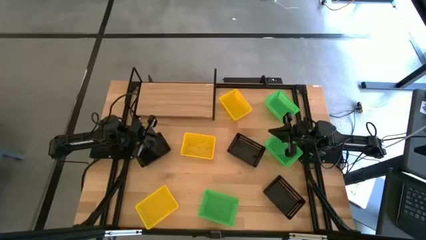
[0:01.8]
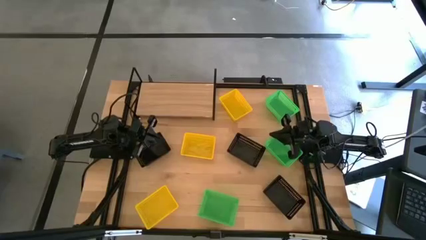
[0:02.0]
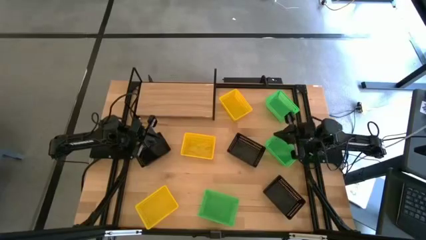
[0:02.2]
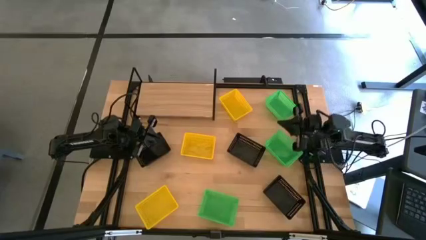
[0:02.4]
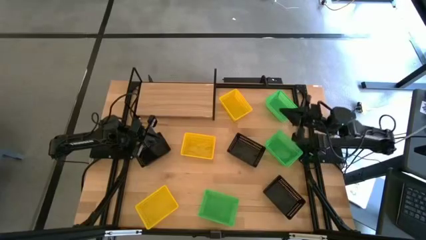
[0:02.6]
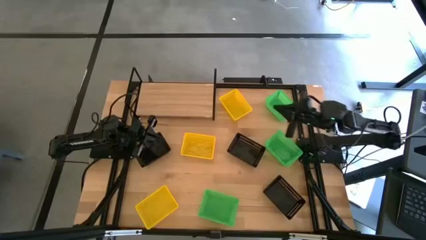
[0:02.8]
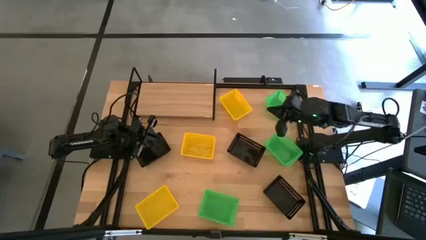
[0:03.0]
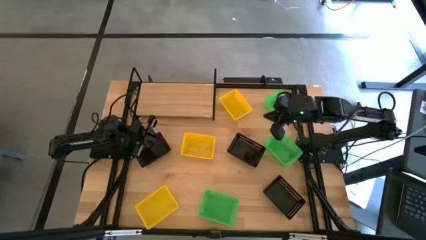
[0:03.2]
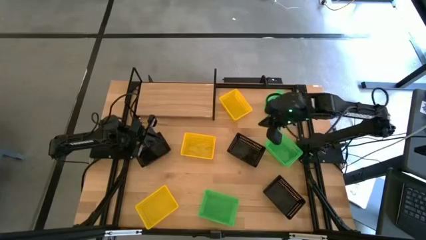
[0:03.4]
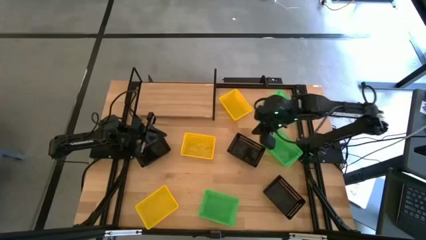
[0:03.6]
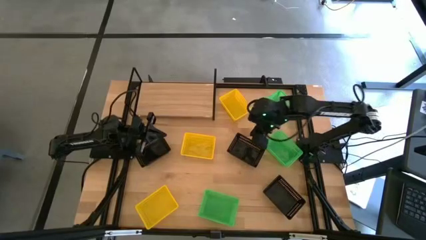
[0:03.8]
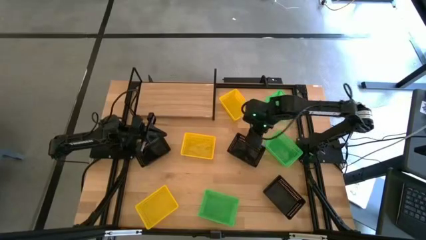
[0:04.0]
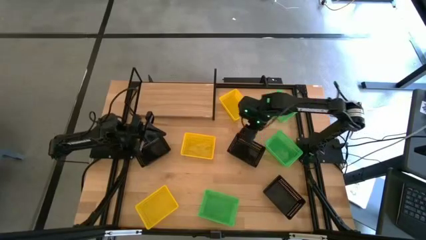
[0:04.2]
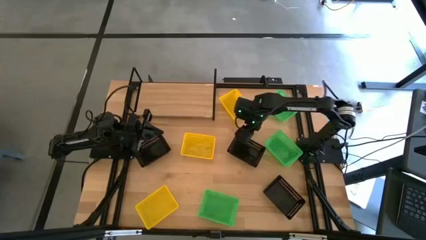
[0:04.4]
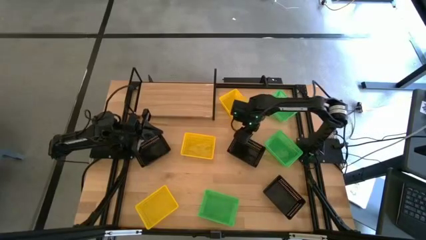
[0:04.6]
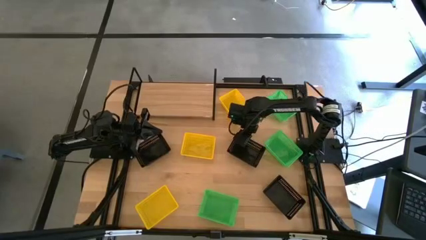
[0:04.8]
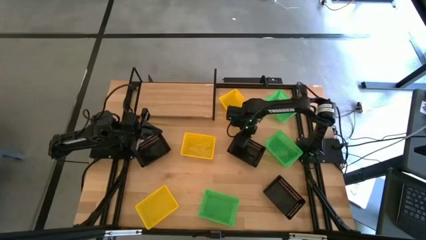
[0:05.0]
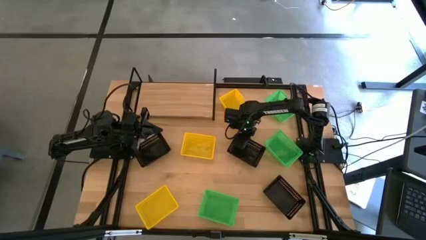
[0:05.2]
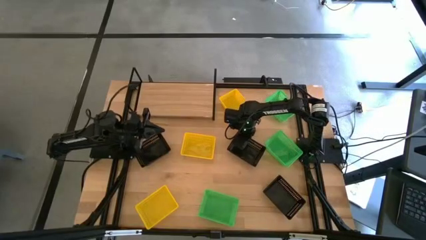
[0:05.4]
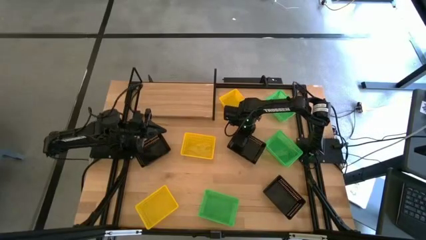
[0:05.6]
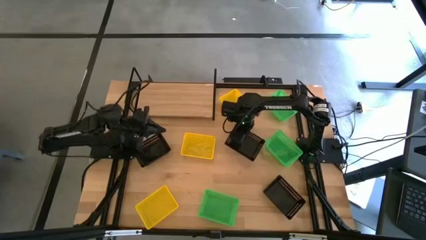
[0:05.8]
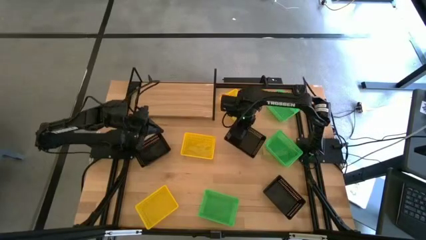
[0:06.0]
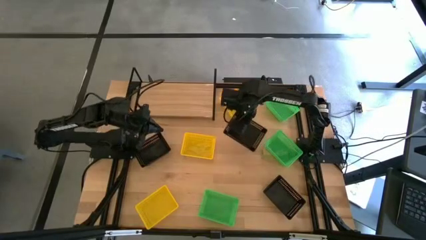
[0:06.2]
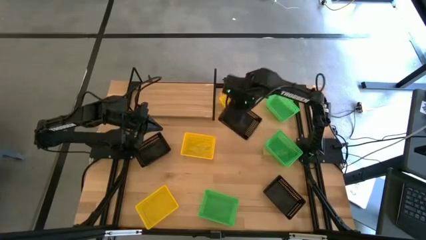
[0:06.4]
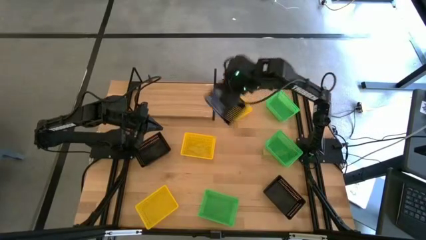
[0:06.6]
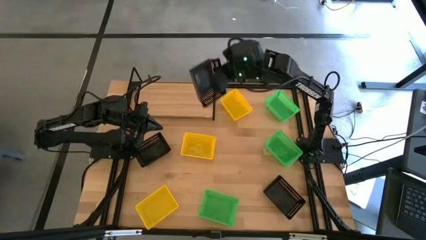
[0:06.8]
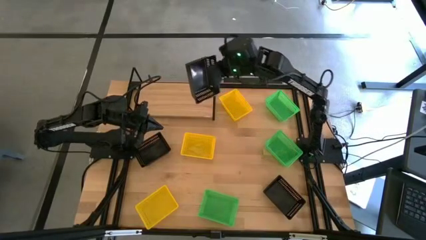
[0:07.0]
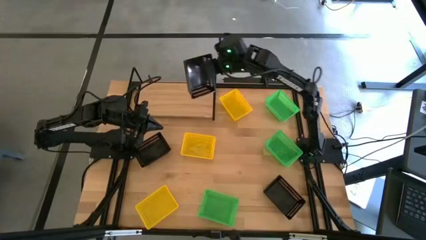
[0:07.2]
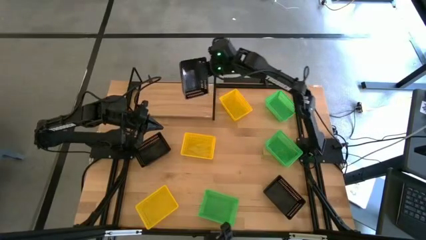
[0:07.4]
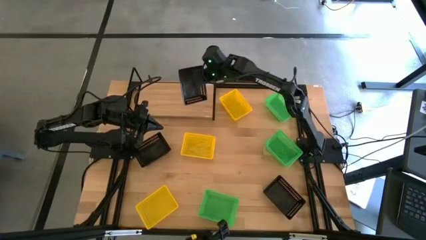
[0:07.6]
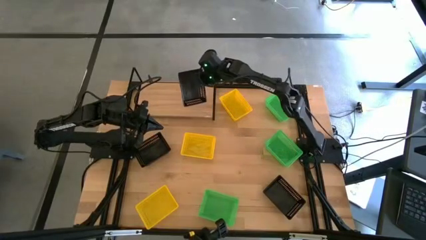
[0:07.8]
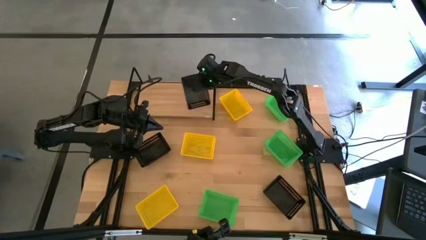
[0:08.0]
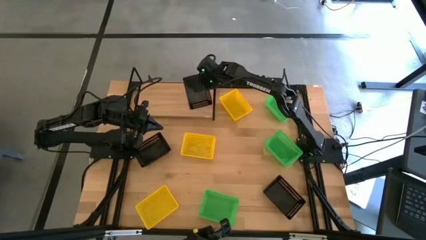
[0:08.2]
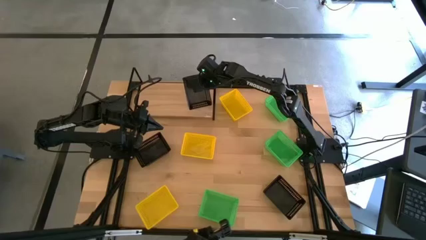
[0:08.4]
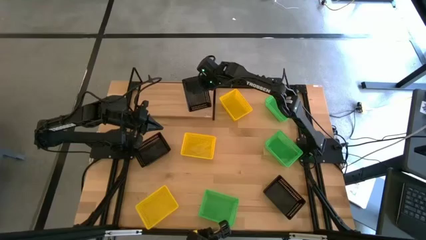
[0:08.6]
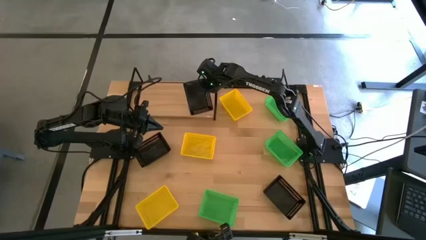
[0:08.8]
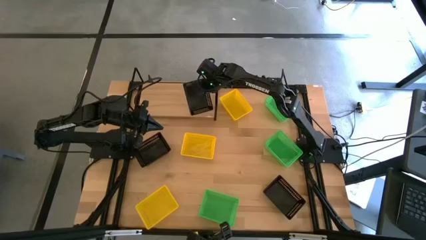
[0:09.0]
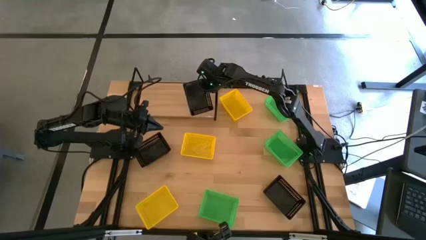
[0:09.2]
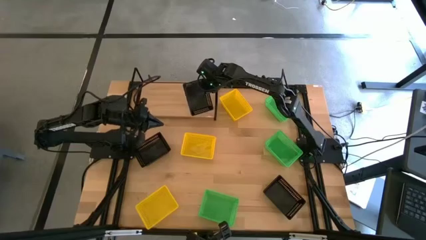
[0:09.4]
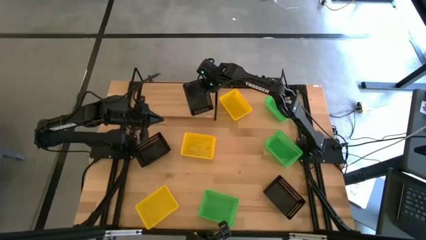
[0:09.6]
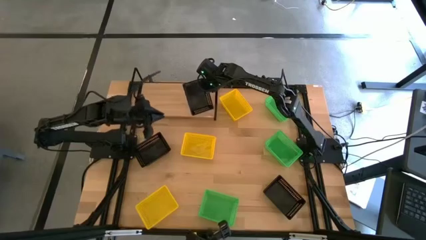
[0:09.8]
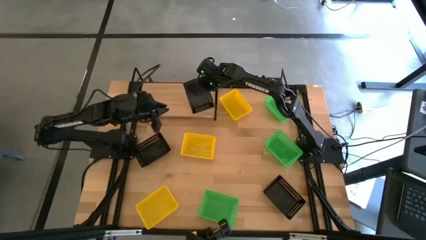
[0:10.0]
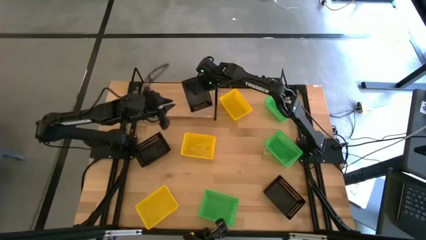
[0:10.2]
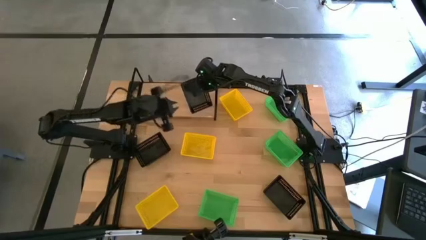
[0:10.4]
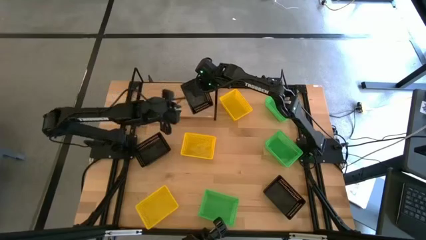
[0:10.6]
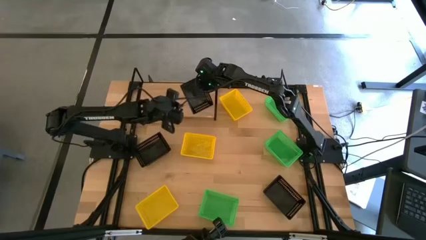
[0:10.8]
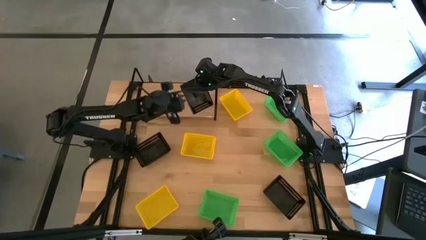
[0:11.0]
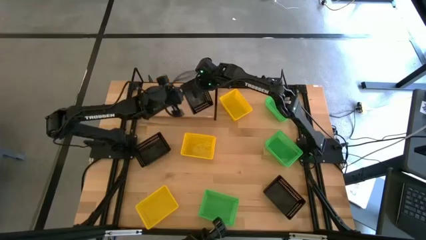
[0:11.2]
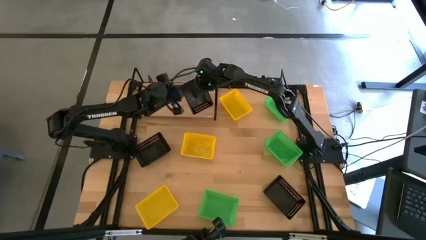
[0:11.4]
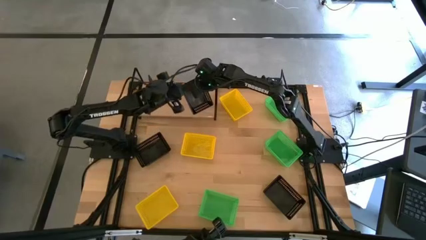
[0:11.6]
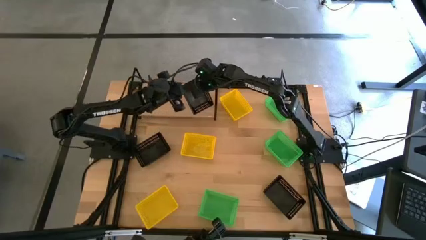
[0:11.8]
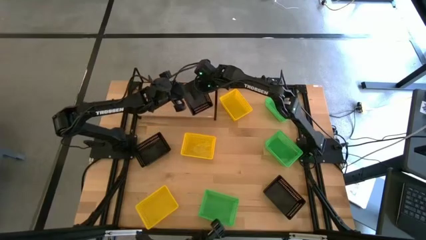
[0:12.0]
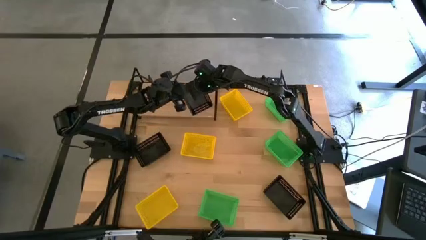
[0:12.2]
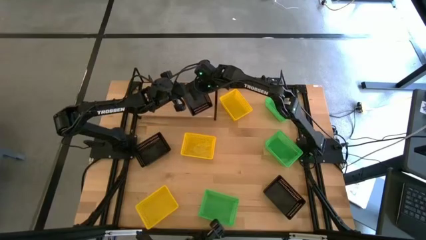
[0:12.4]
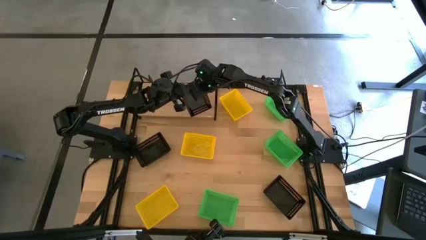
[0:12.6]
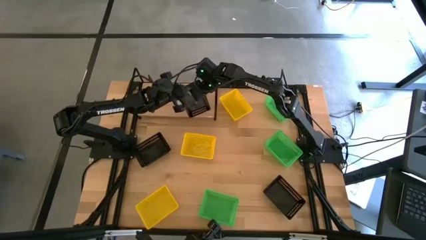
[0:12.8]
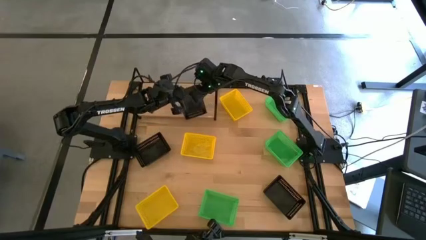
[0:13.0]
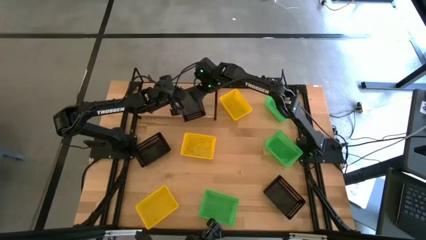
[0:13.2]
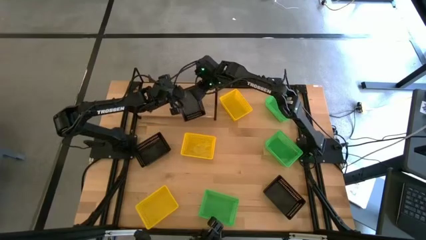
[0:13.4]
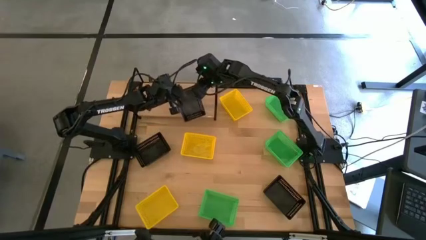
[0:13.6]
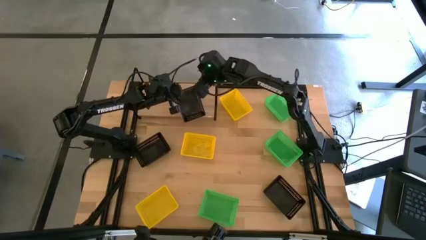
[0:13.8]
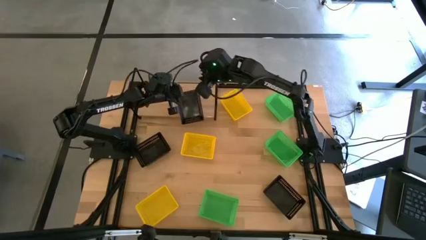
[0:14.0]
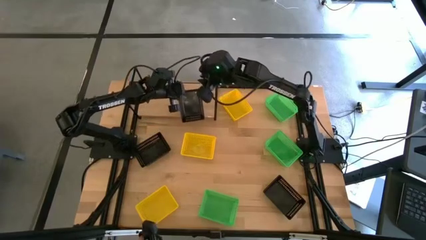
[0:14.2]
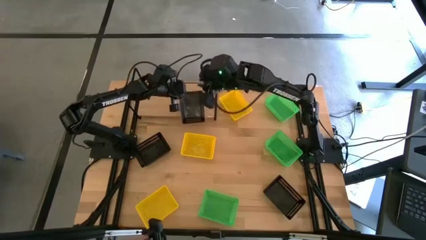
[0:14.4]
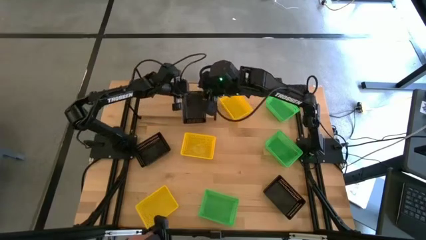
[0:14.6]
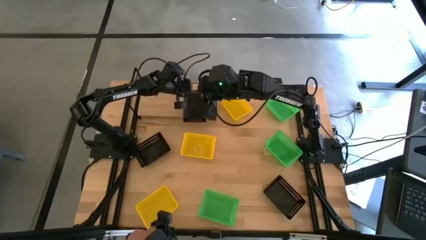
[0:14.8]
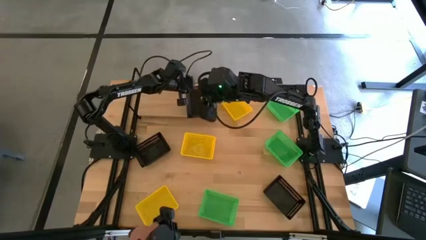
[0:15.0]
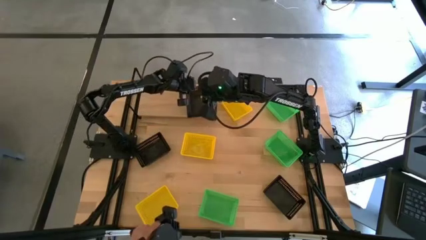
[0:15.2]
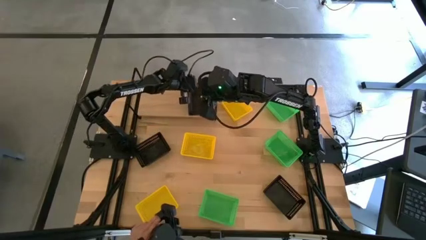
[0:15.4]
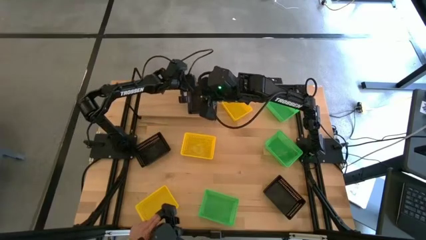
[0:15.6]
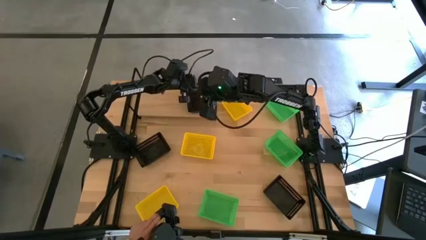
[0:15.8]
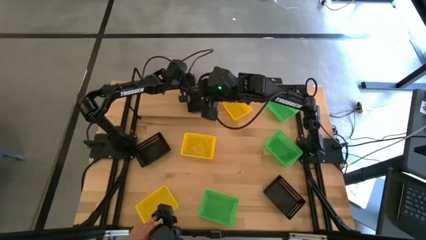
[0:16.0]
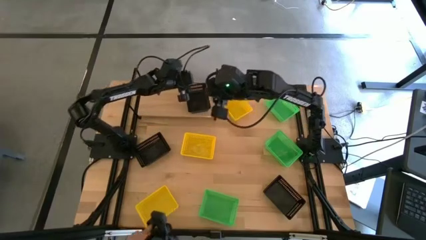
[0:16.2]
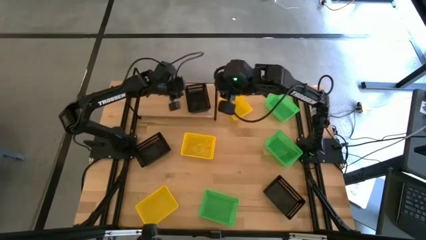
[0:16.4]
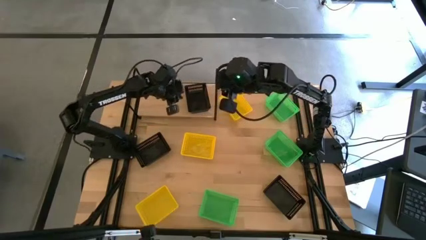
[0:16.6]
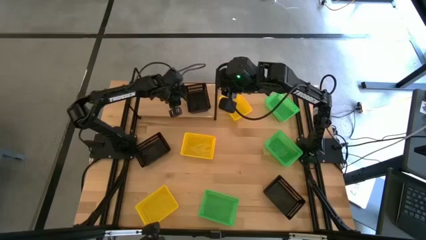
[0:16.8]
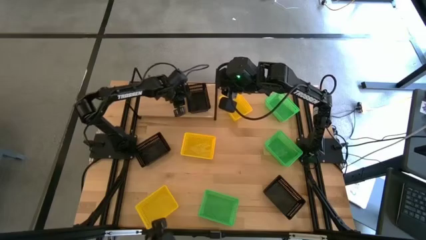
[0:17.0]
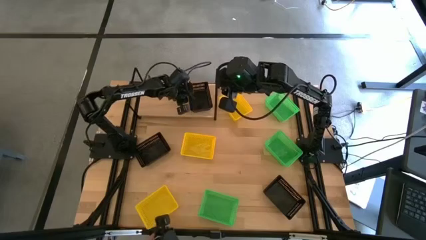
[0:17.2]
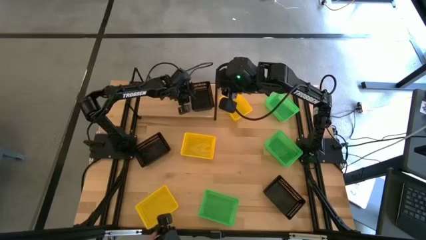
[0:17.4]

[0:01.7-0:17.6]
Task: Stack baskets on shelf by color
Put the top right black basket on the shelf
